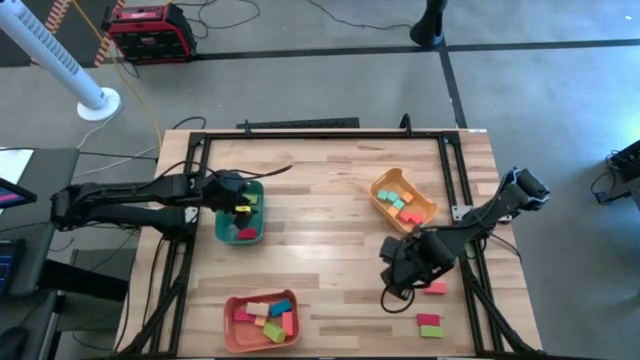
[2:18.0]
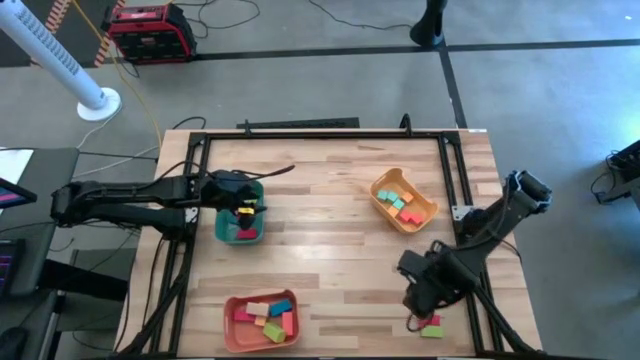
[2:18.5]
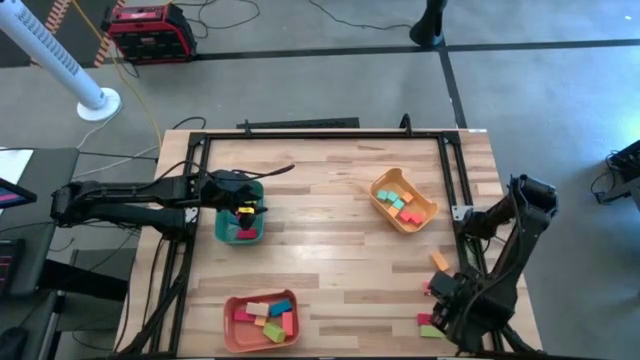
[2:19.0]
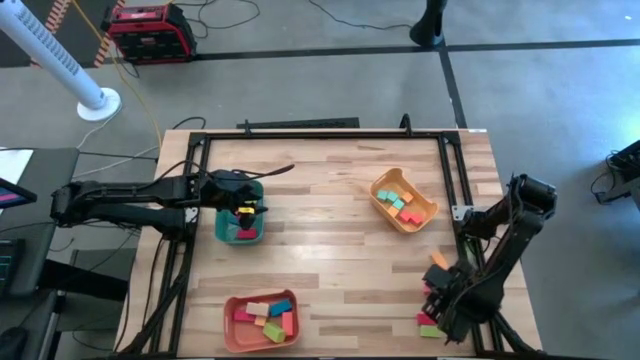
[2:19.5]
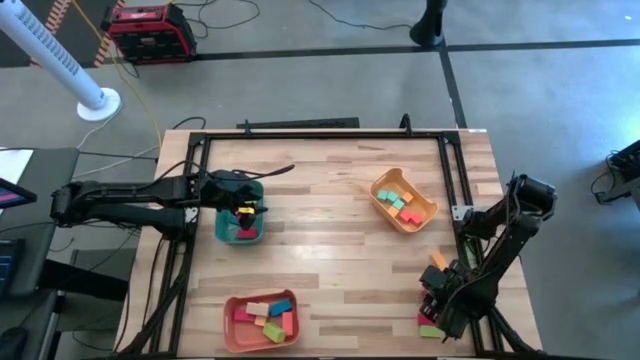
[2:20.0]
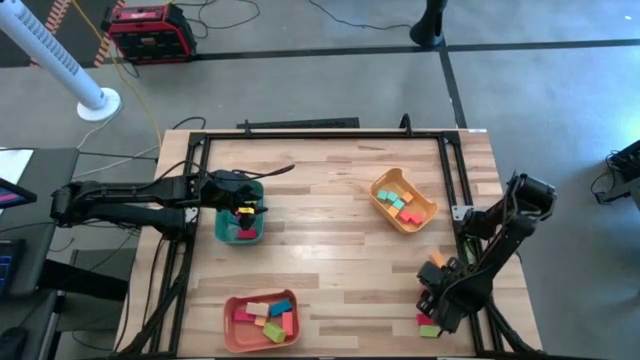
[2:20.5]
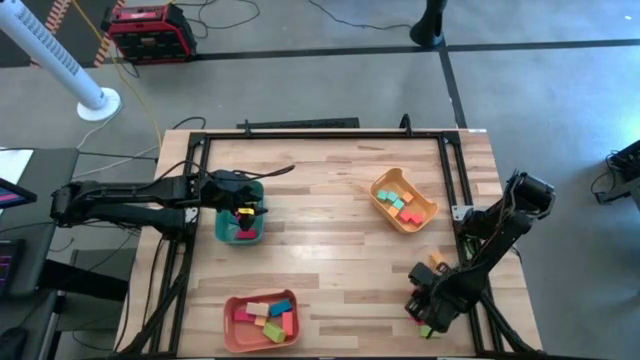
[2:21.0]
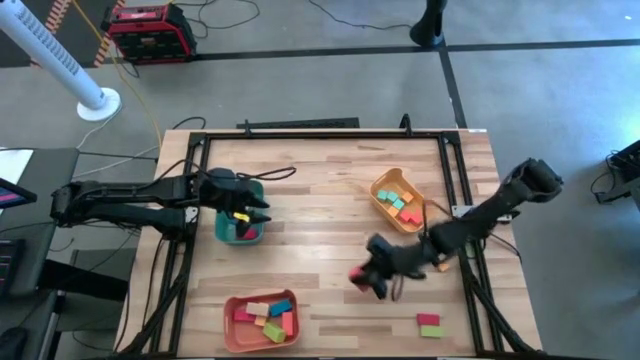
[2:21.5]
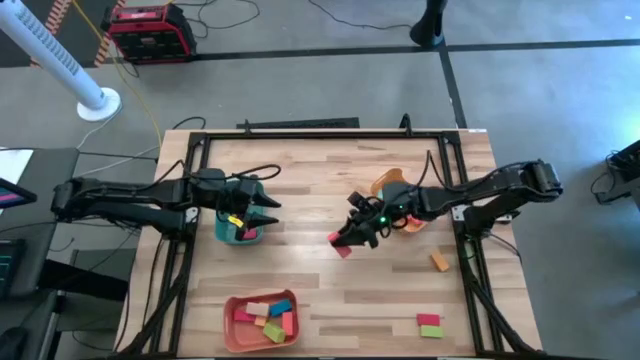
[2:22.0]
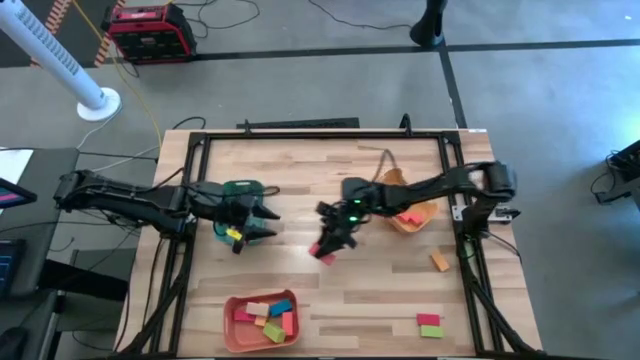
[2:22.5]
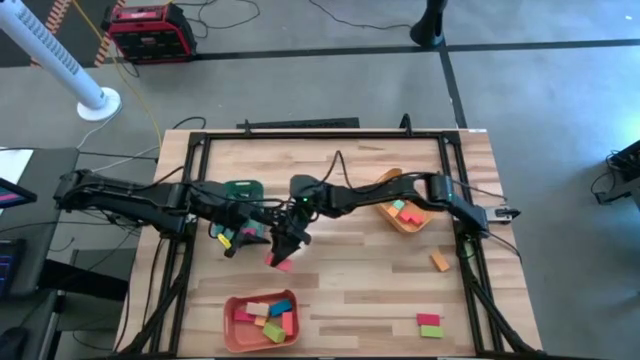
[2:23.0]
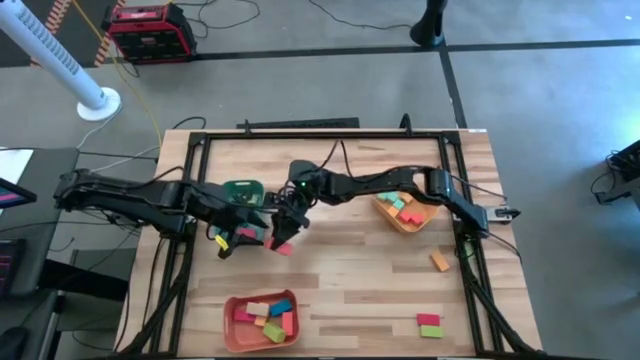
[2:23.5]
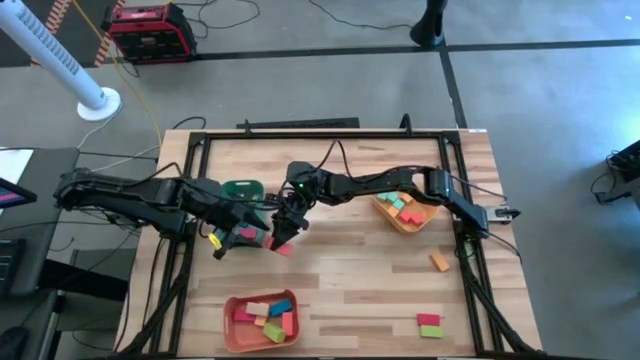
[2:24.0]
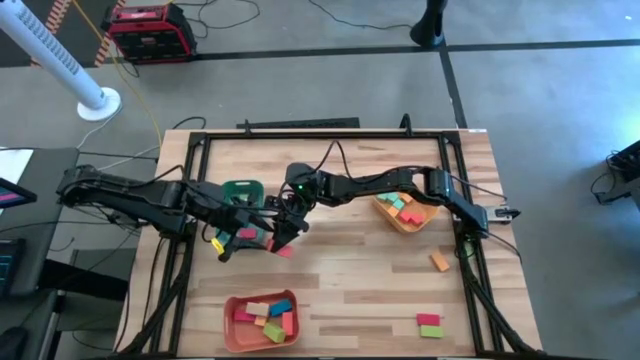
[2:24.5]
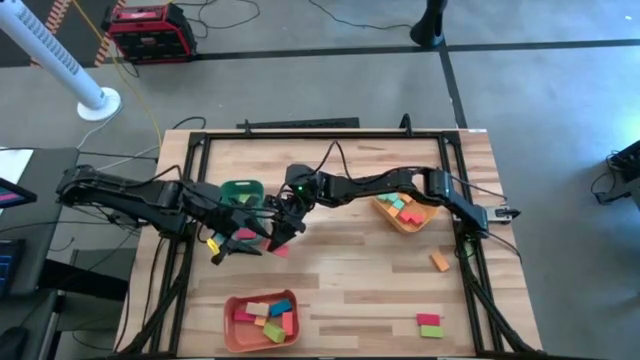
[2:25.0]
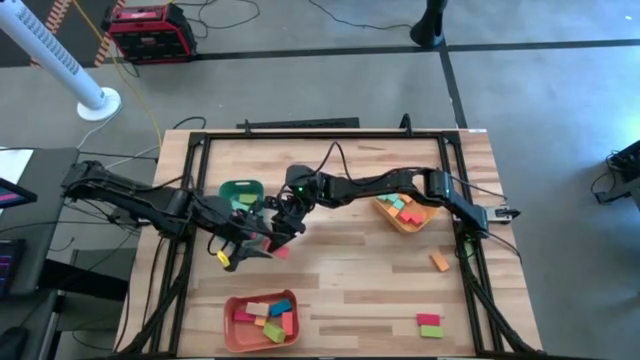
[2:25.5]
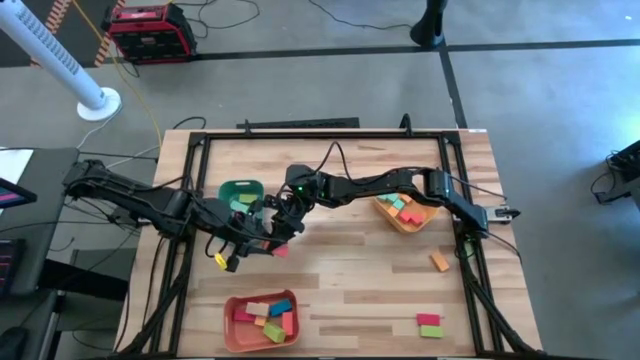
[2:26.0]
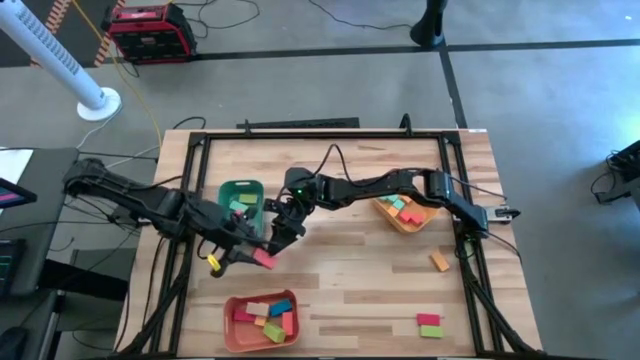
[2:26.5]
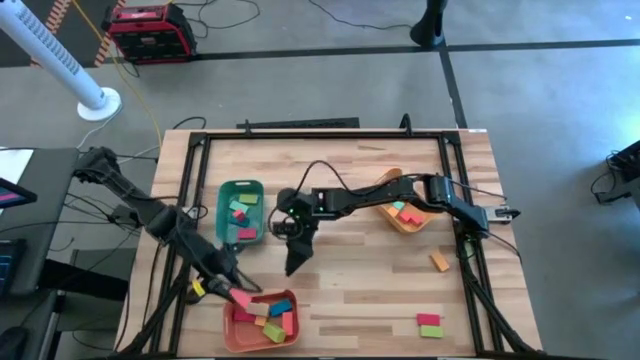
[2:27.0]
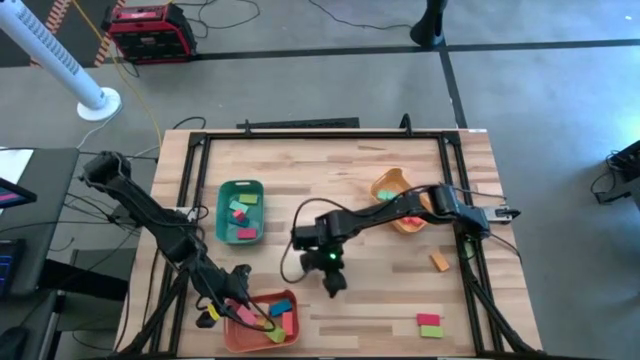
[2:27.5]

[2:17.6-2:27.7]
Task: Sort blocks by size
Put the thick orange rectangular block into the orange bin

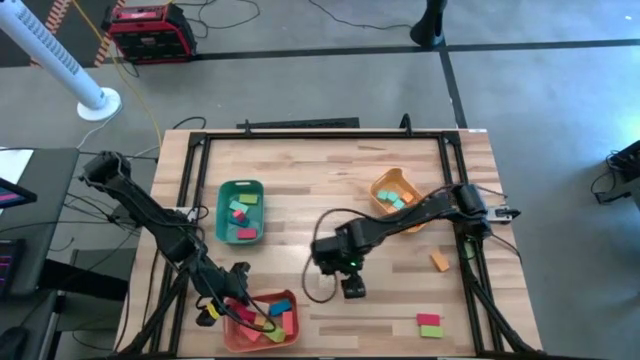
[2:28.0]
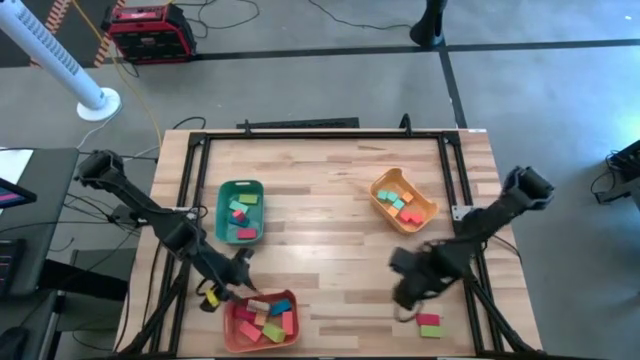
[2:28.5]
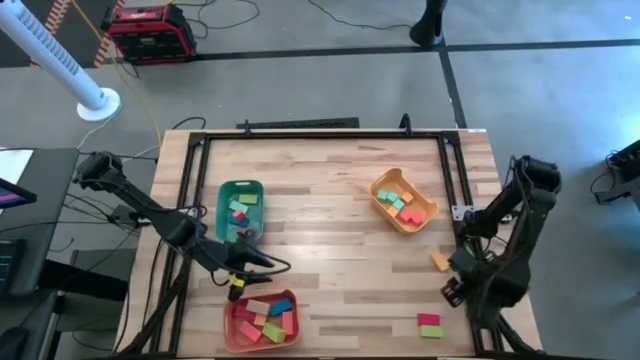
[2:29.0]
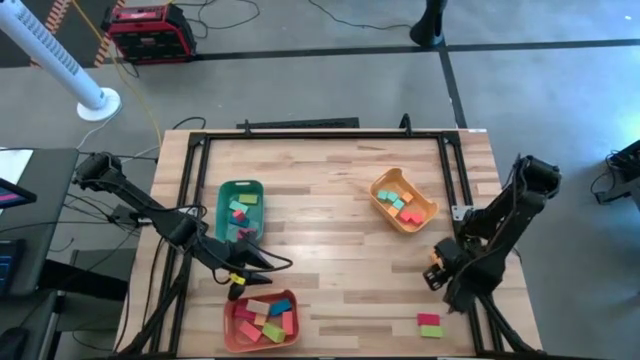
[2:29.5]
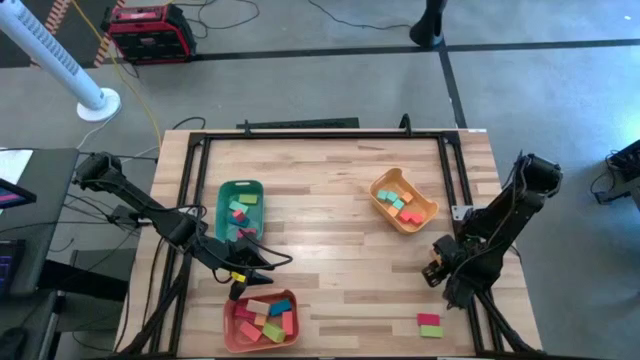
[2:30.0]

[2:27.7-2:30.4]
Put the thin yellow rectangular block into the green bin

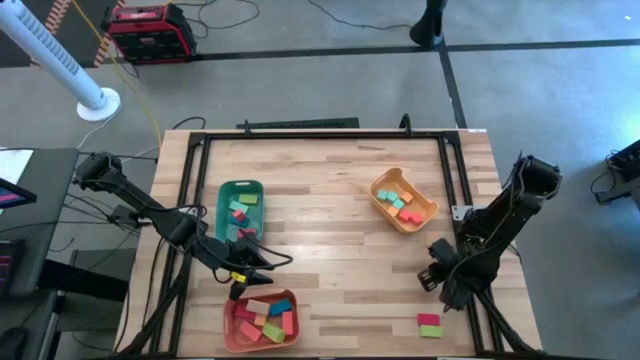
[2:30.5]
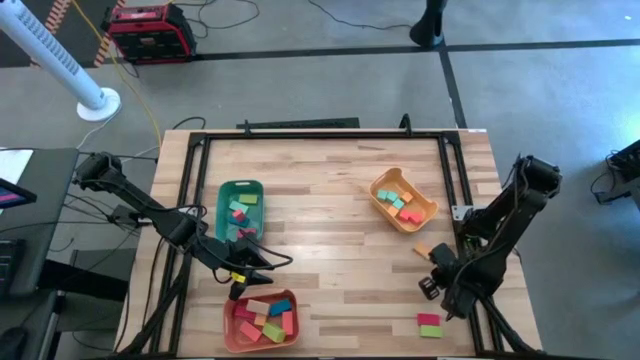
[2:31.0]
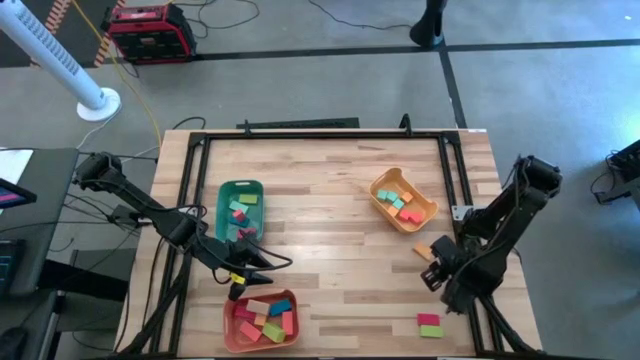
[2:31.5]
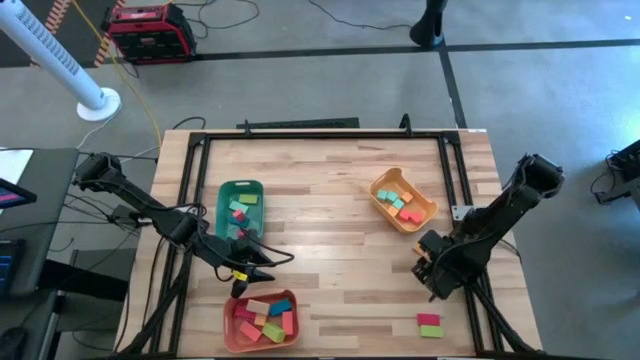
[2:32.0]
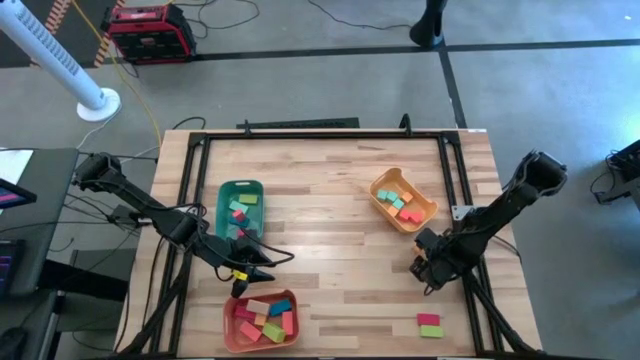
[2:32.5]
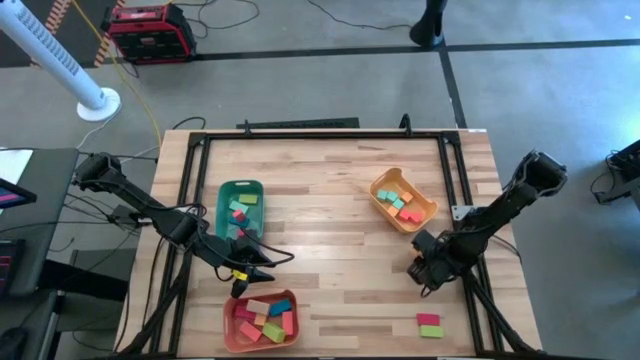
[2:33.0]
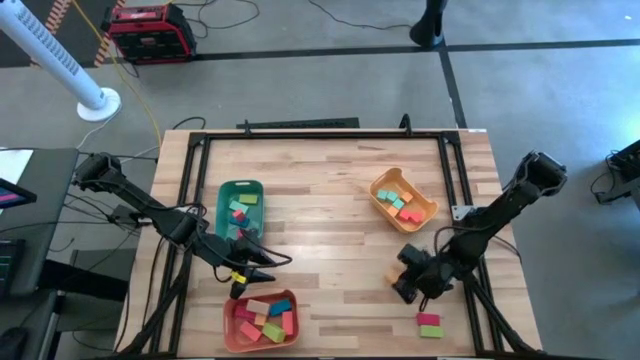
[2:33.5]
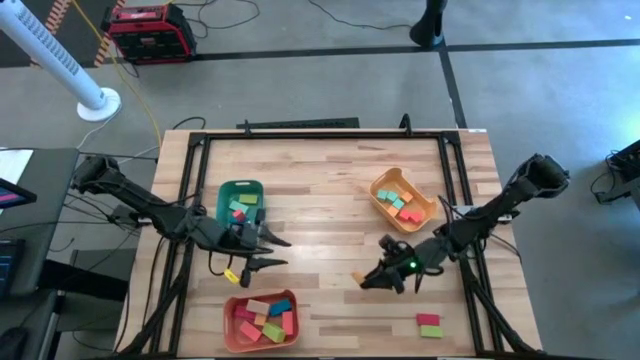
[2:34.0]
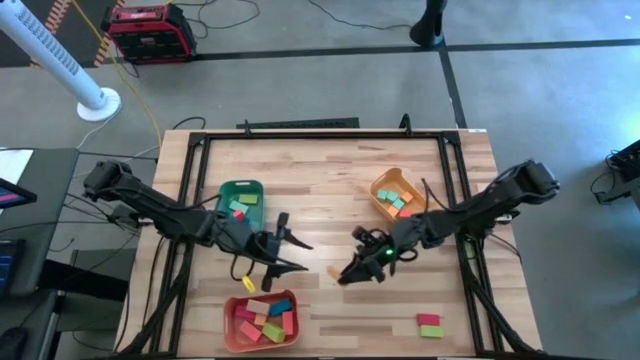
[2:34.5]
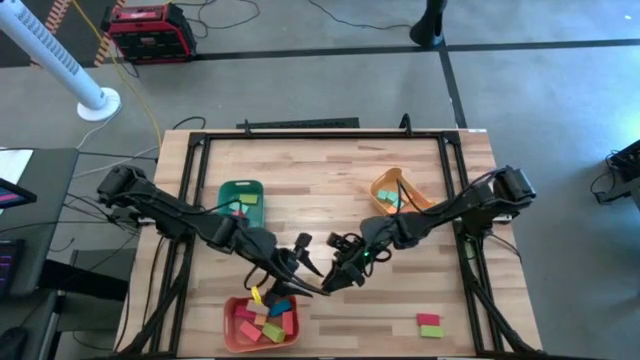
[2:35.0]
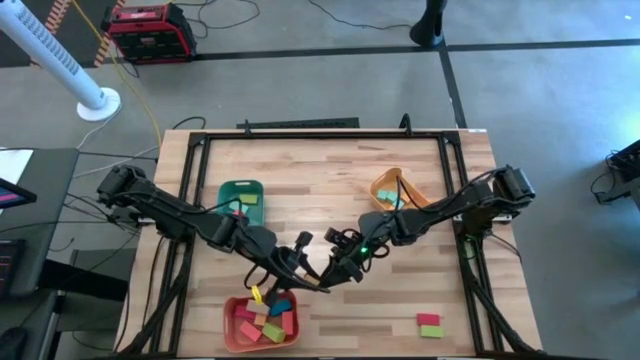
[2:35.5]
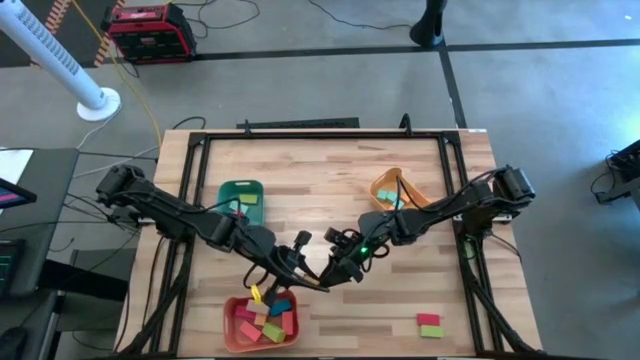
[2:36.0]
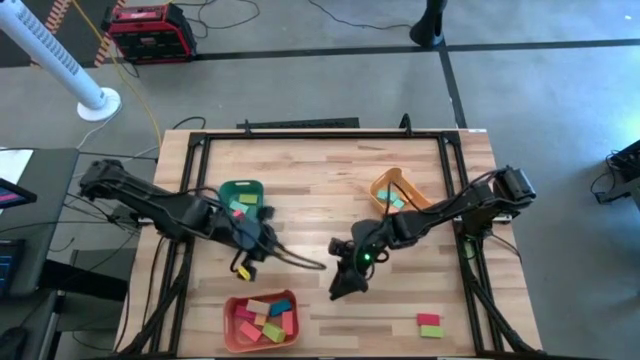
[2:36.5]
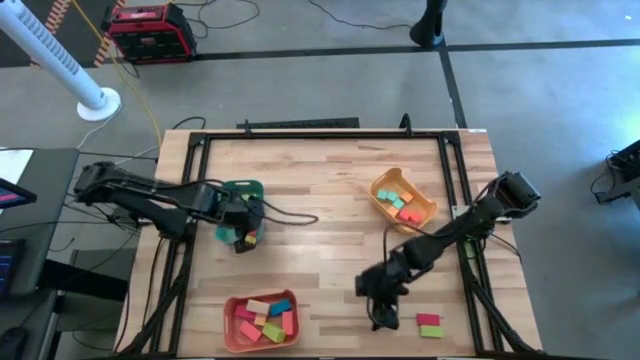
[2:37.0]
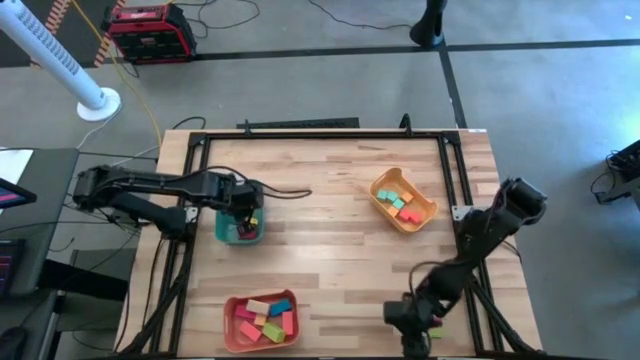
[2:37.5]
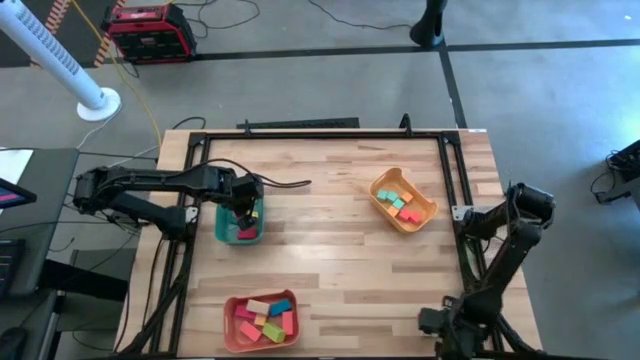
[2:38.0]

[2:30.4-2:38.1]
Put the thin yellow rectangular block into the green bin

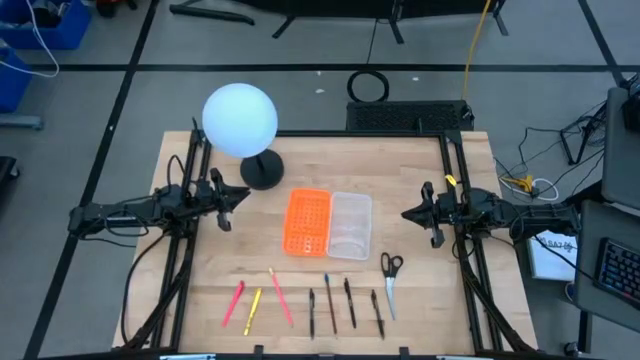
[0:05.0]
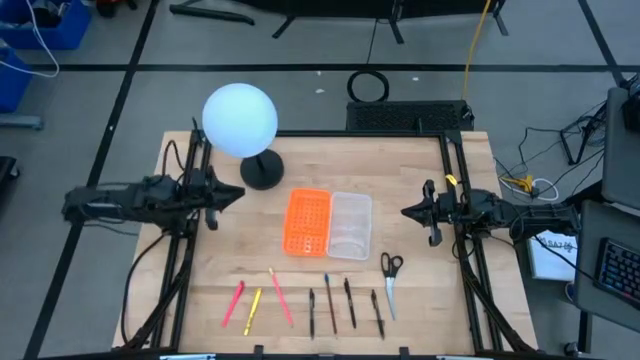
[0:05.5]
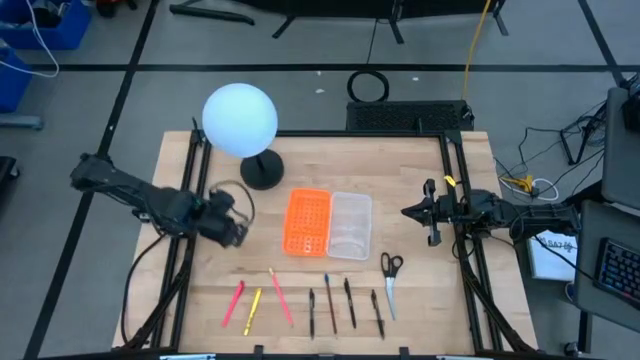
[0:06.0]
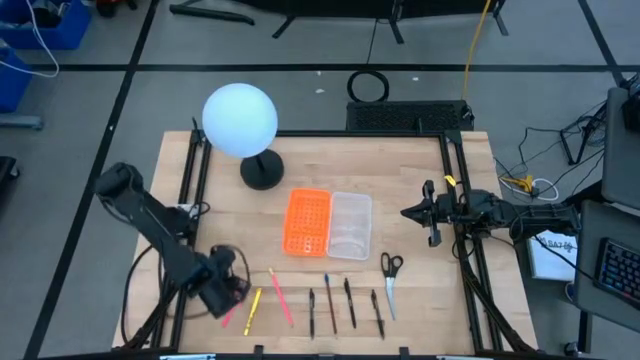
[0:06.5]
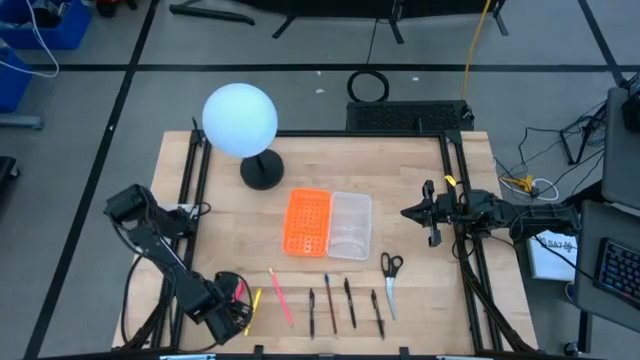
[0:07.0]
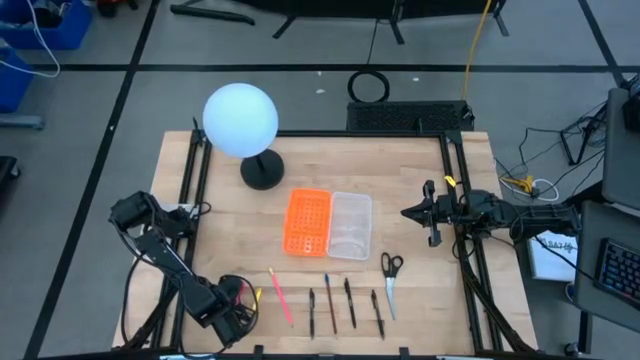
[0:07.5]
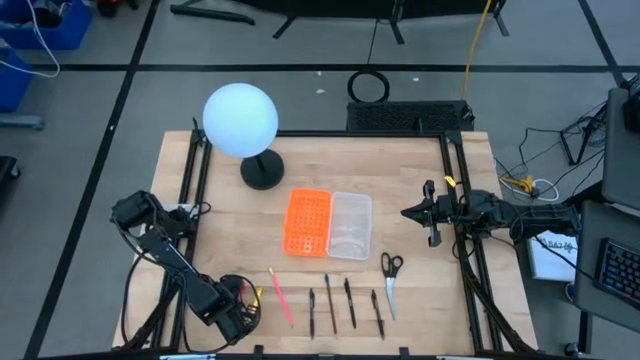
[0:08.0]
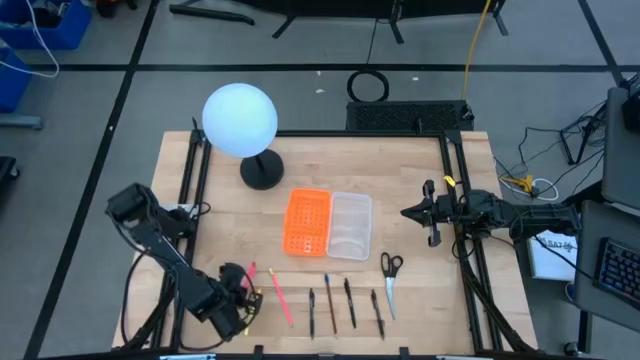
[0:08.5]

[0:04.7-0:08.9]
Task: Pick & place school supplies into a supply box
Put the pink pen into the orange supply box
